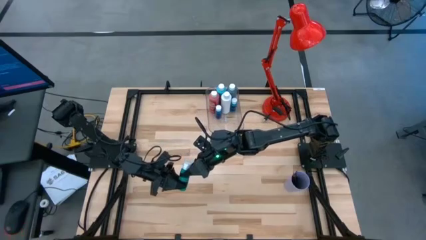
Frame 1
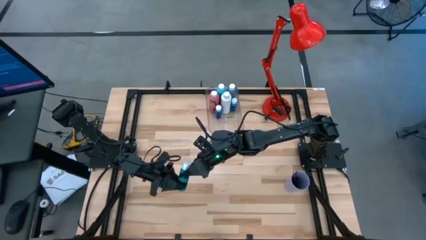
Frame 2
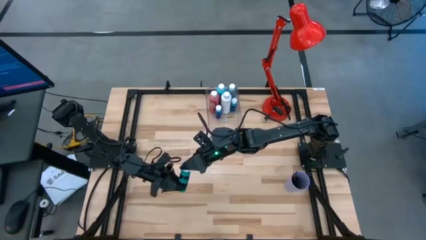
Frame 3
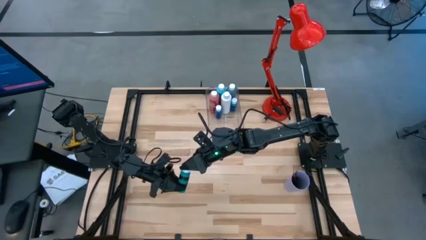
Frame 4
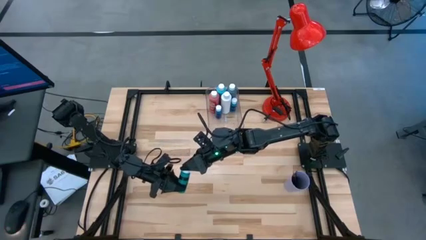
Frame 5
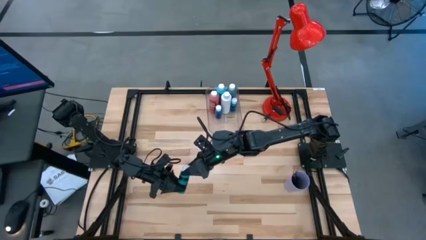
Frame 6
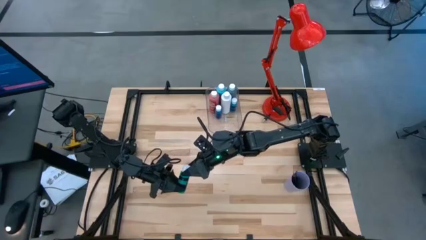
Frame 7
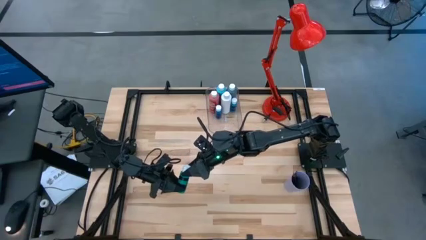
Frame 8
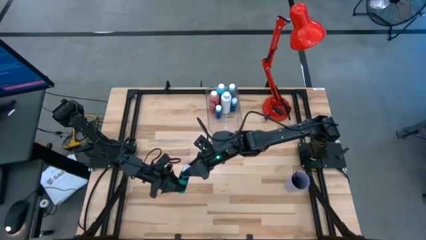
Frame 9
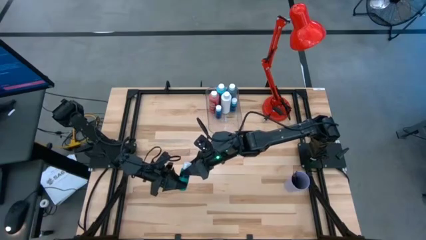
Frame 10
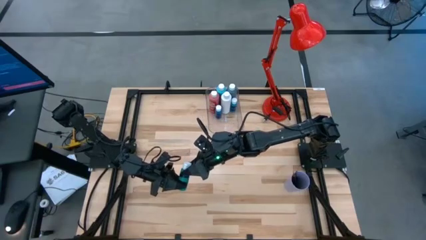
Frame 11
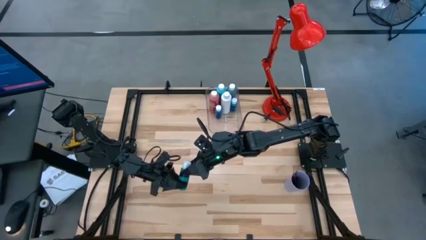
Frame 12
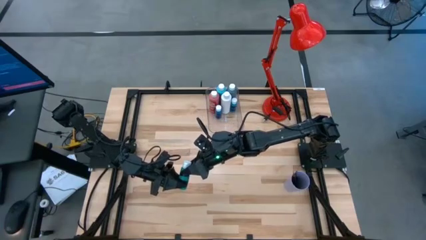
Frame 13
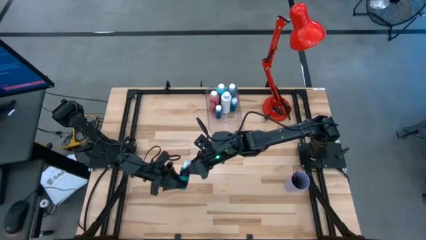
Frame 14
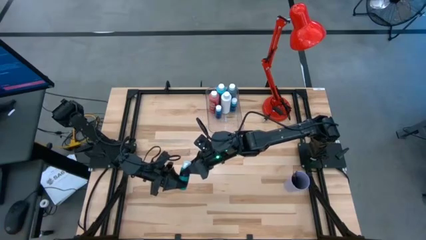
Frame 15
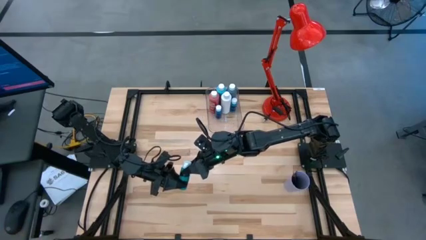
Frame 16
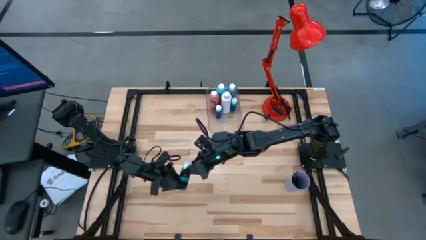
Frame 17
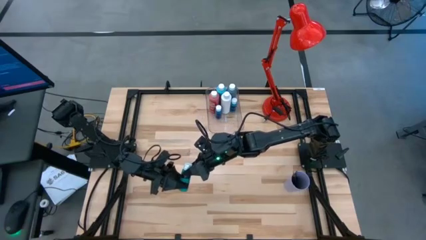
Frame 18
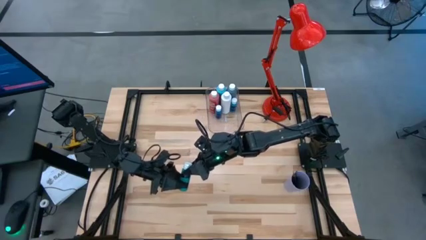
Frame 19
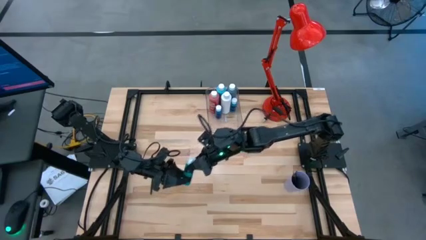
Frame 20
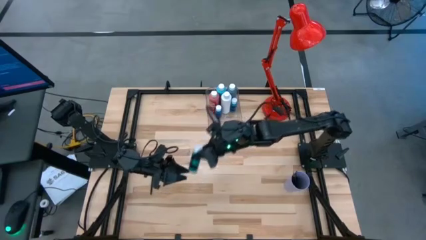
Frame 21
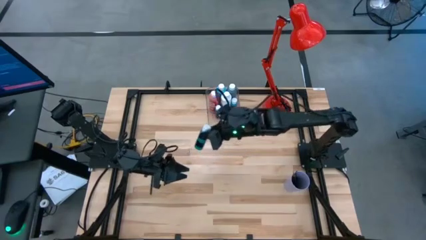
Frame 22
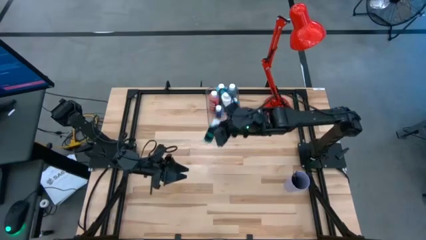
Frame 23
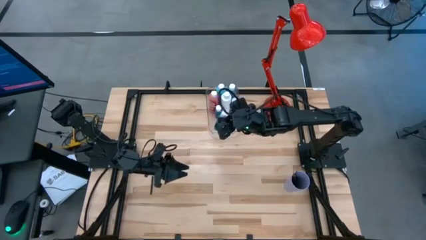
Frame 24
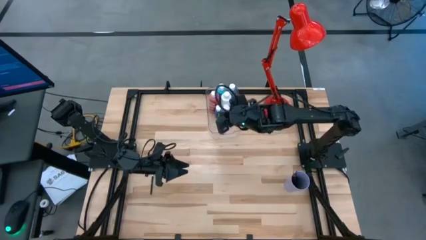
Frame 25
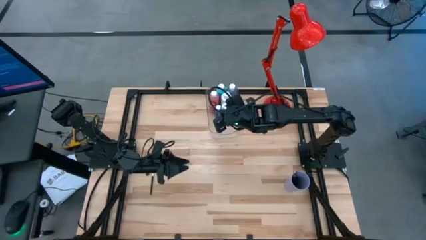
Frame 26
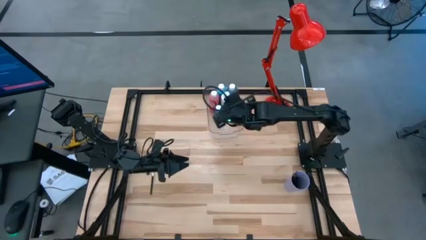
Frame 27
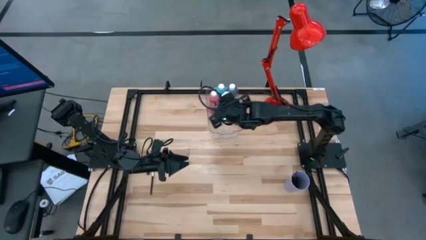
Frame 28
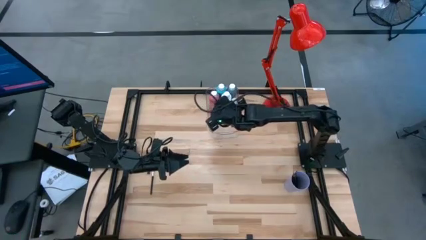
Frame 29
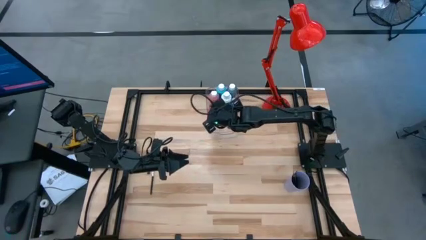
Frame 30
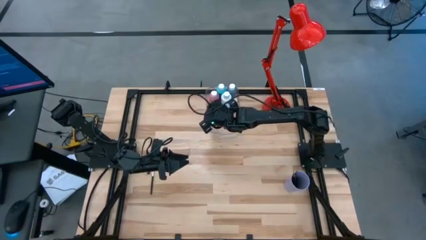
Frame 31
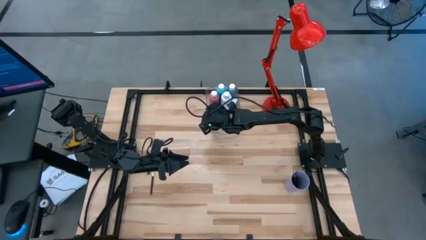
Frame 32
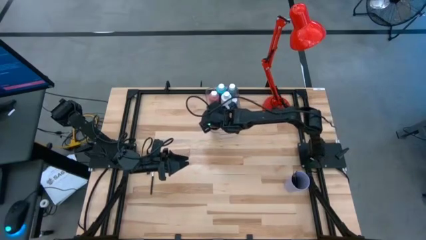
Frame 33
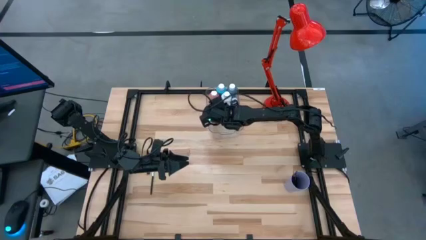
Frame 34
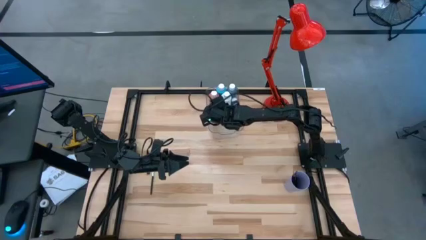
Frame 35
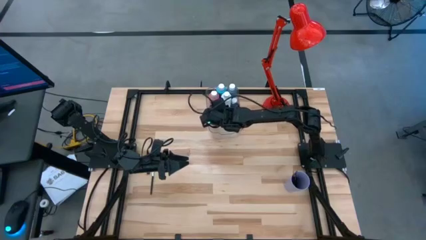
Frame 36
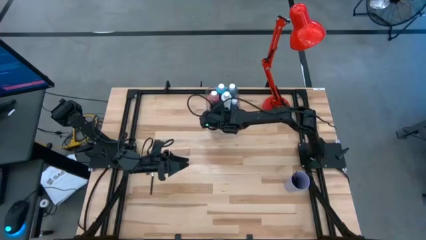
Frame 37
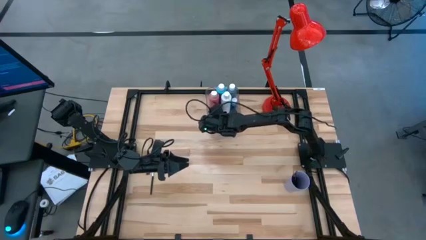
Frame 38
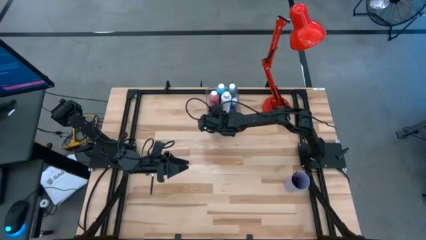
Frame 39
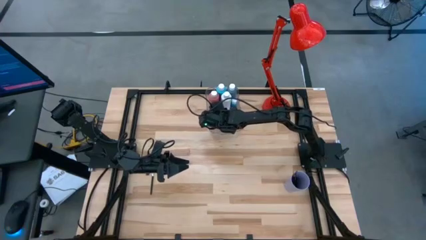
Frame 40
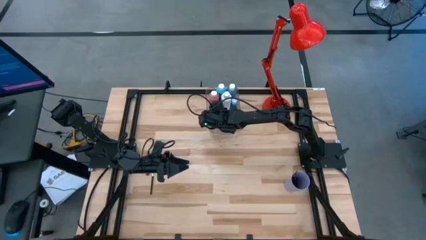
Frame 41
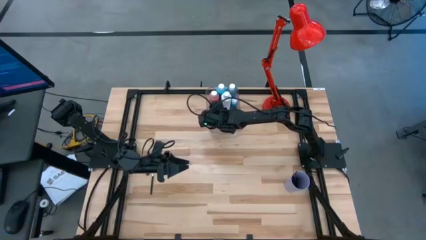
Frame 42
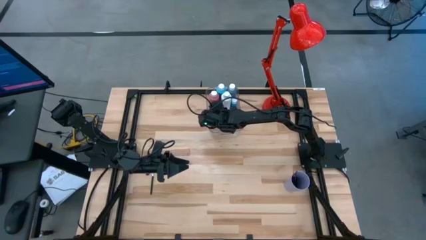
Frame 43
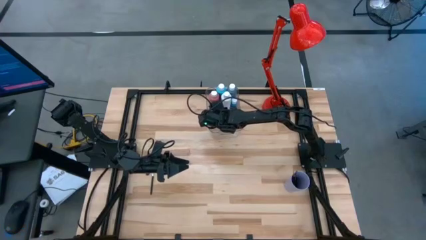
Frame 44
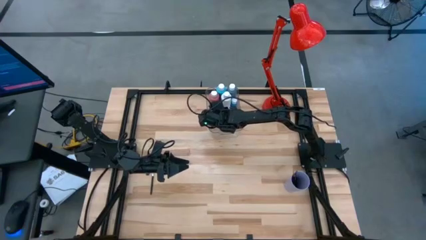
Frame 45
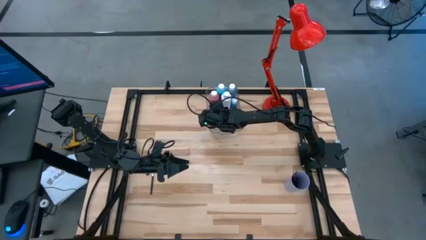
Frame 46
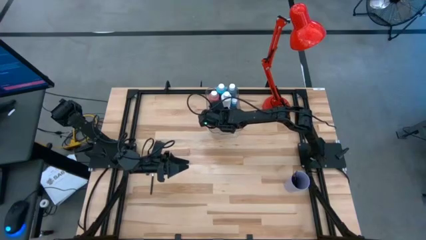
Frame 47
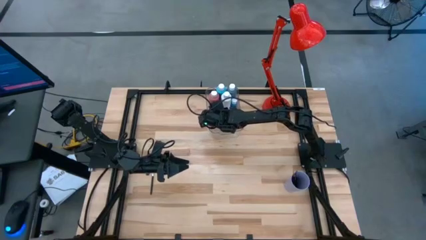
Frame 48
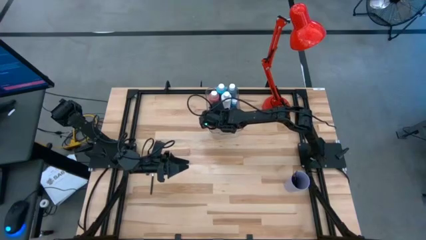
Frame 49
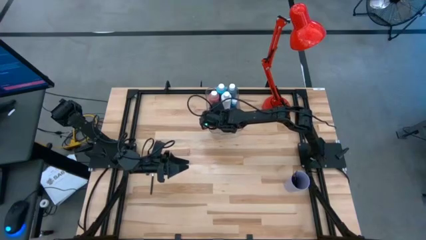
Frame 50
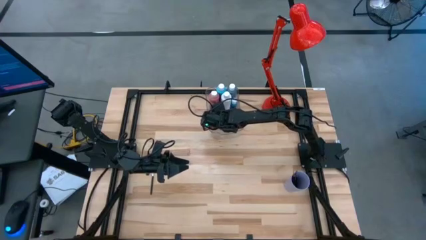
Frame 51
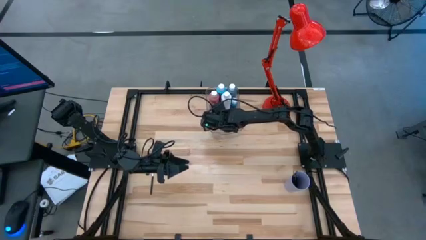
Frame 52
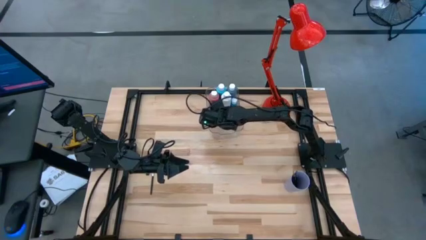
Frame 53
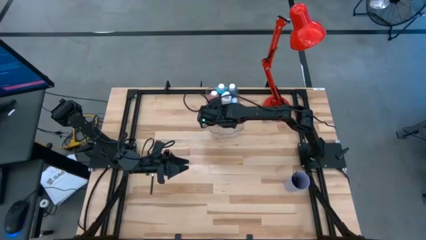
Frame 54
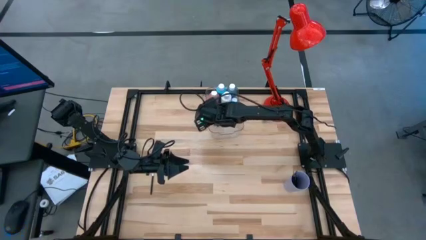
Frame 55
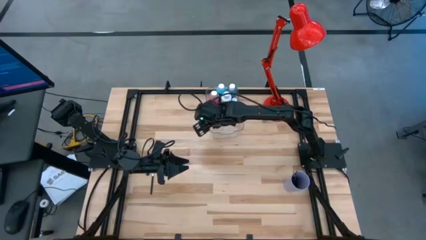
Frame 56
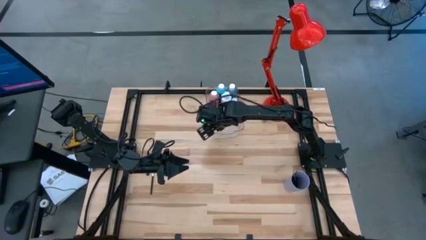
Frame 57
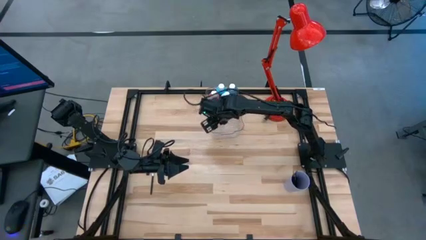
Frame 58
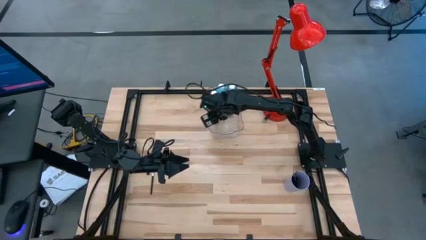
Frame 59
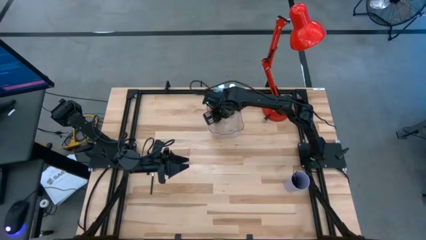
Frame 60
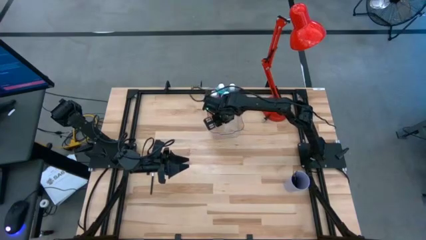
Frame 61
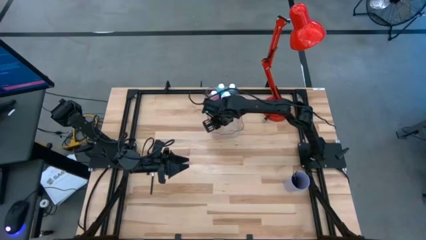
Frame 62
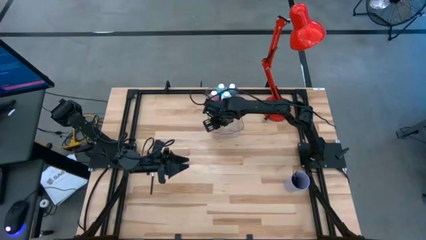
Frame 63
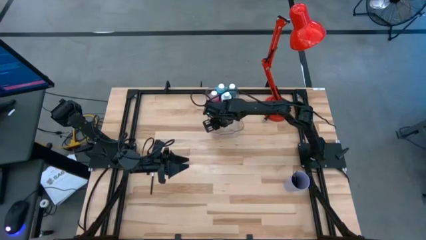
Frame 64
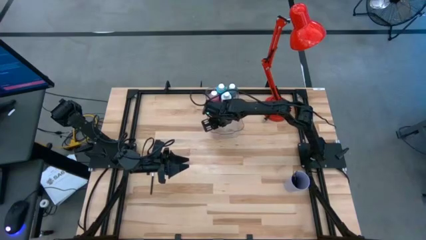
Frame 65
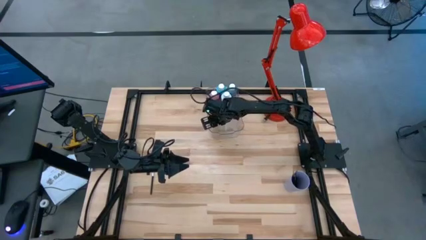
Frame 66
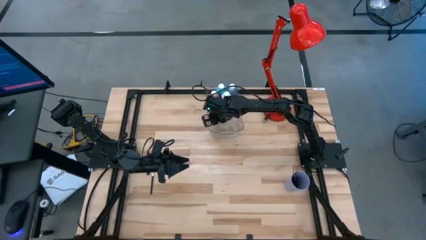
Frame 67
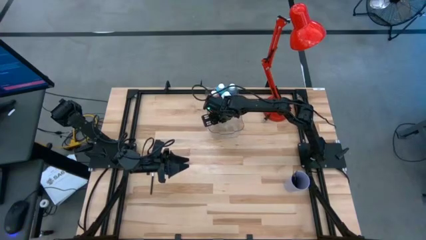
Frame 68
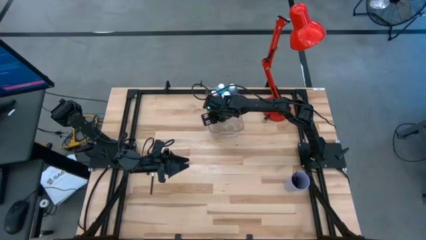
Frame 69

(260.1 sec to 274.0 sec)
Task: Pick & Place Paint Supplies
Put the green paint bottle into the transparent bin
